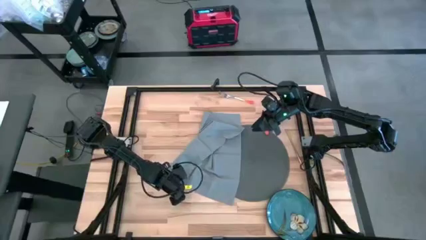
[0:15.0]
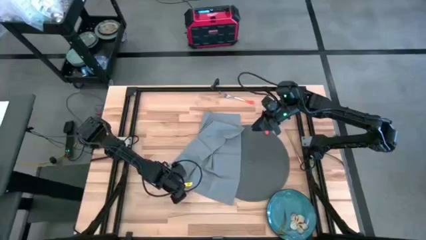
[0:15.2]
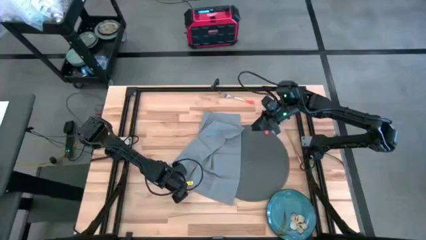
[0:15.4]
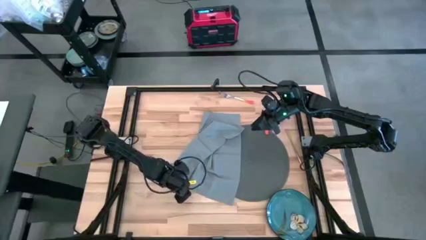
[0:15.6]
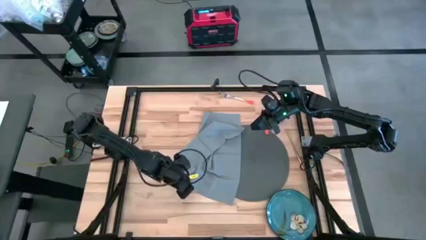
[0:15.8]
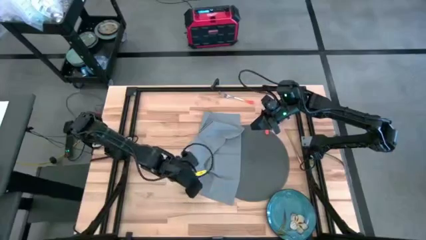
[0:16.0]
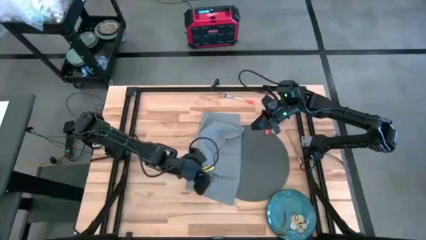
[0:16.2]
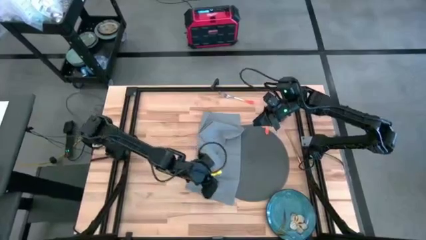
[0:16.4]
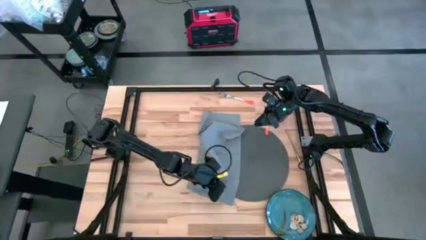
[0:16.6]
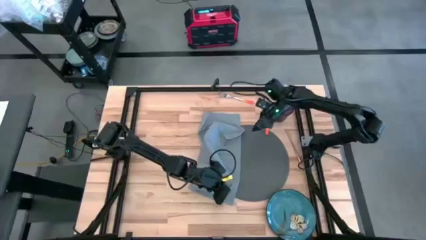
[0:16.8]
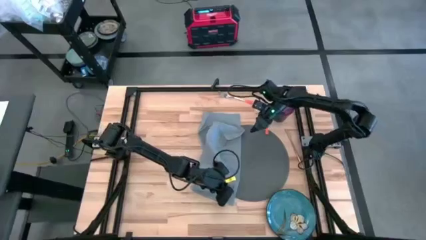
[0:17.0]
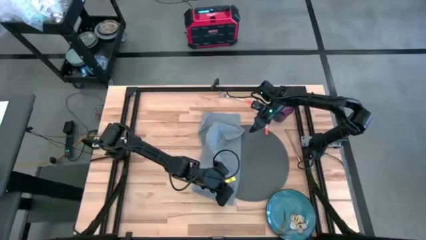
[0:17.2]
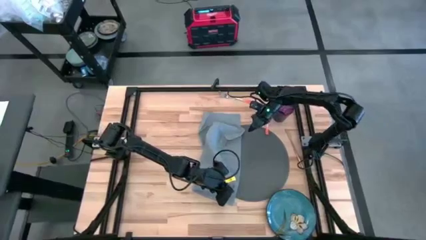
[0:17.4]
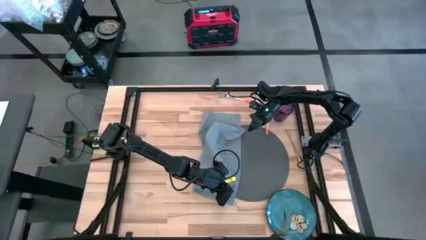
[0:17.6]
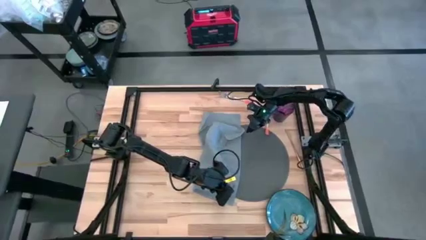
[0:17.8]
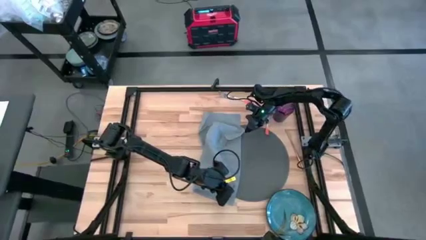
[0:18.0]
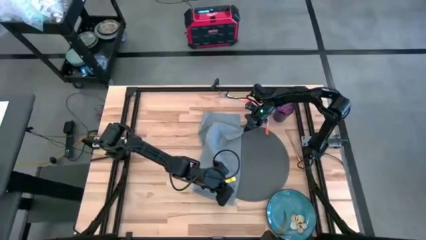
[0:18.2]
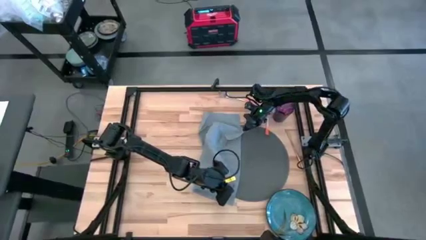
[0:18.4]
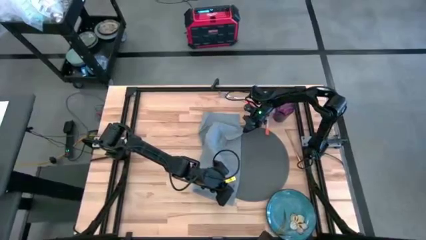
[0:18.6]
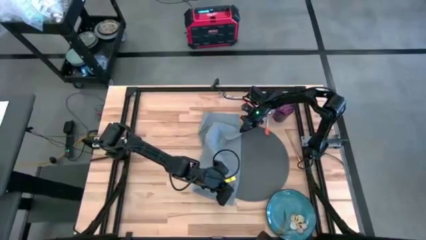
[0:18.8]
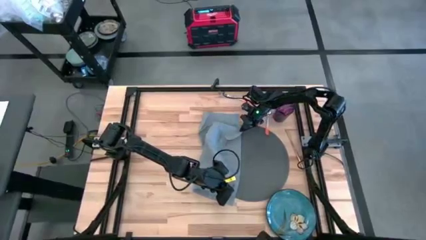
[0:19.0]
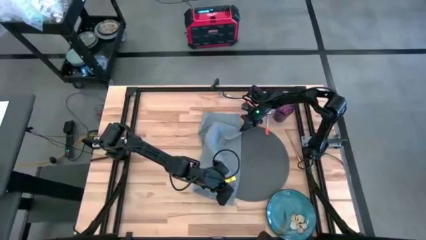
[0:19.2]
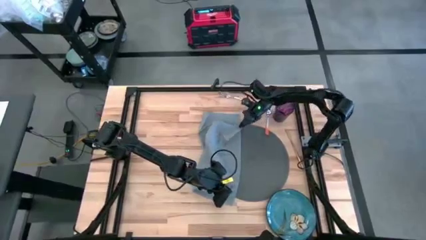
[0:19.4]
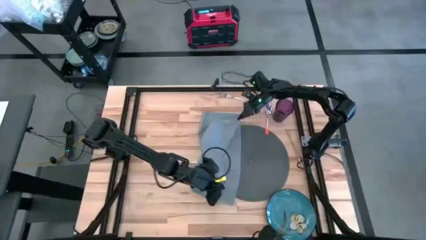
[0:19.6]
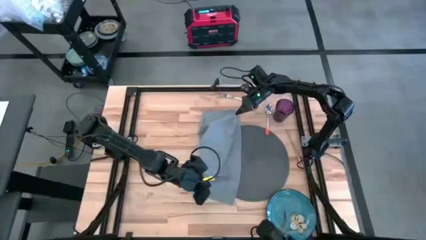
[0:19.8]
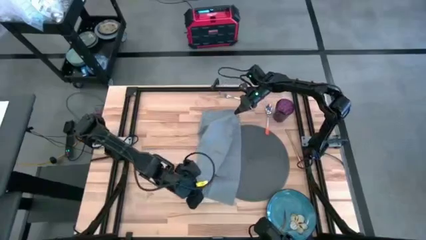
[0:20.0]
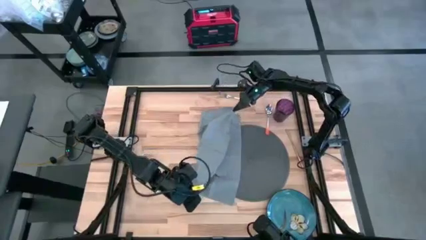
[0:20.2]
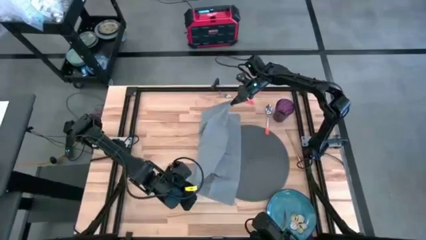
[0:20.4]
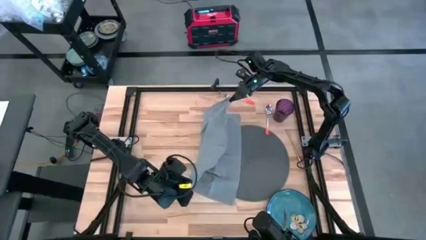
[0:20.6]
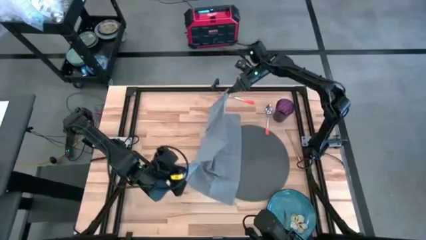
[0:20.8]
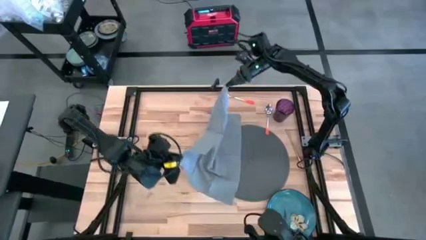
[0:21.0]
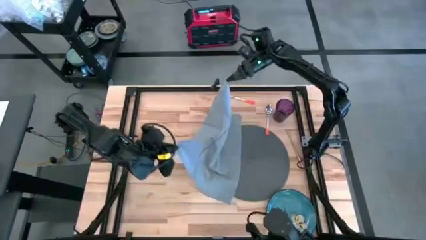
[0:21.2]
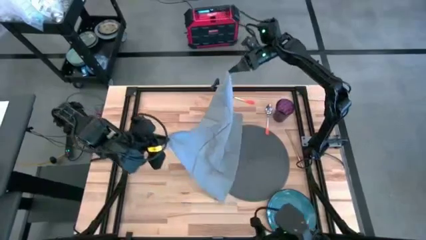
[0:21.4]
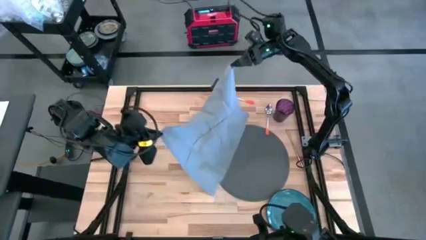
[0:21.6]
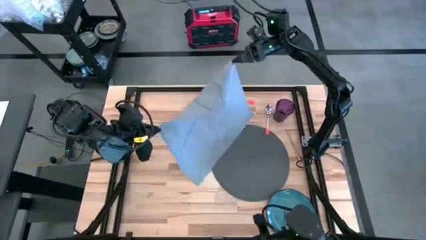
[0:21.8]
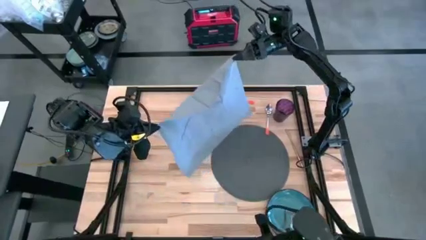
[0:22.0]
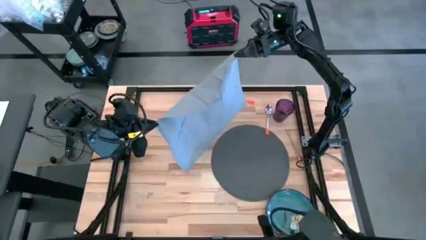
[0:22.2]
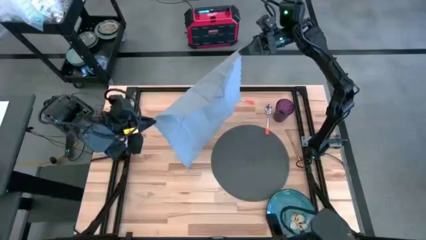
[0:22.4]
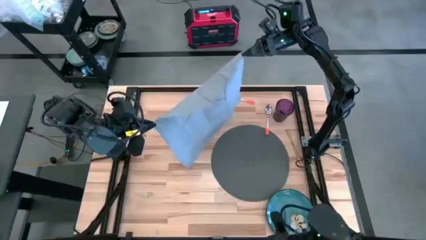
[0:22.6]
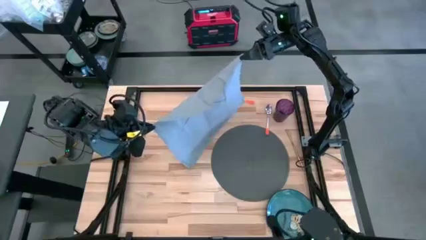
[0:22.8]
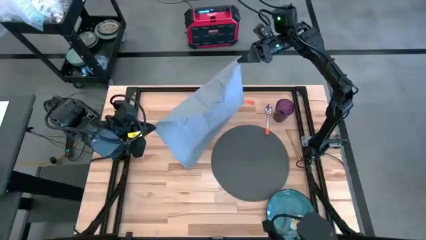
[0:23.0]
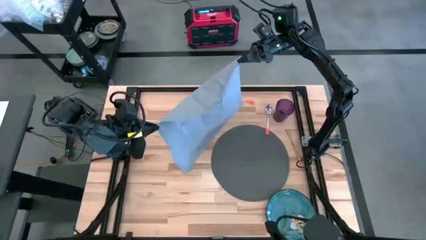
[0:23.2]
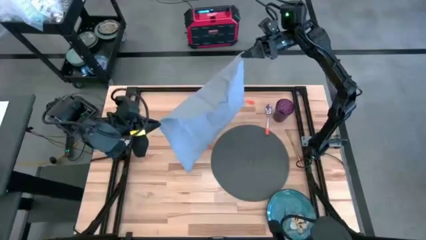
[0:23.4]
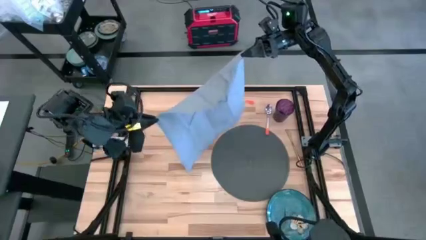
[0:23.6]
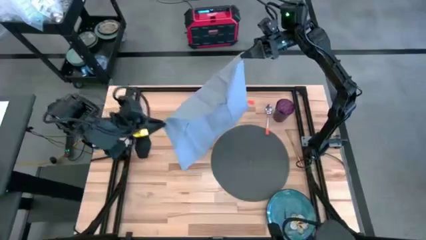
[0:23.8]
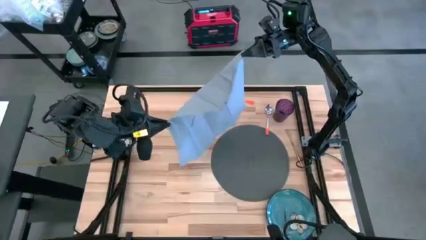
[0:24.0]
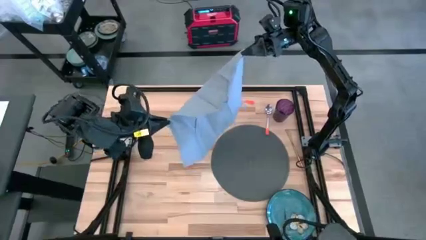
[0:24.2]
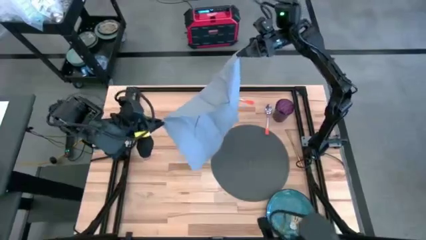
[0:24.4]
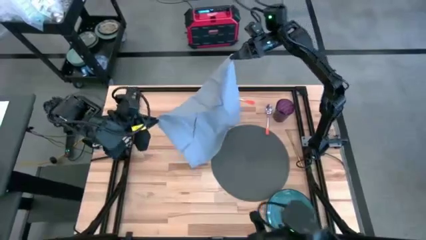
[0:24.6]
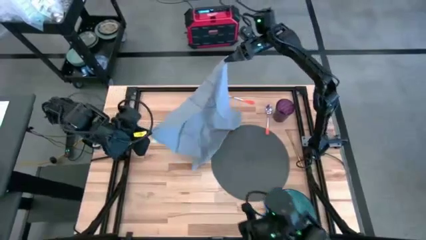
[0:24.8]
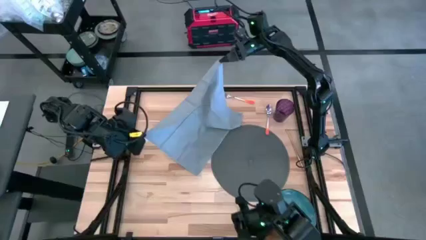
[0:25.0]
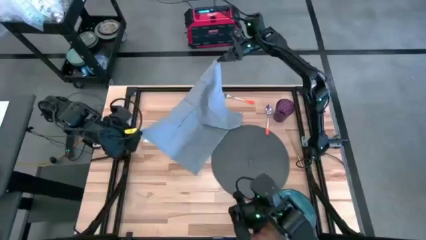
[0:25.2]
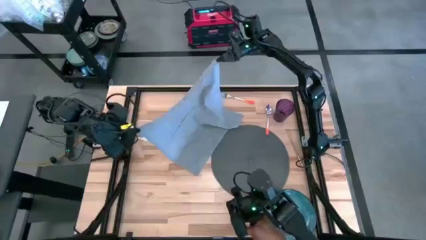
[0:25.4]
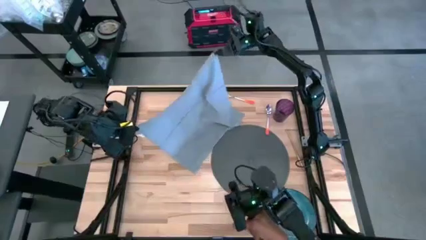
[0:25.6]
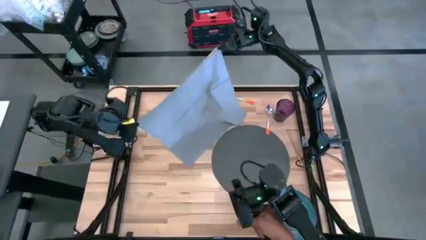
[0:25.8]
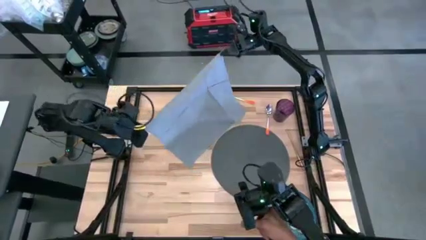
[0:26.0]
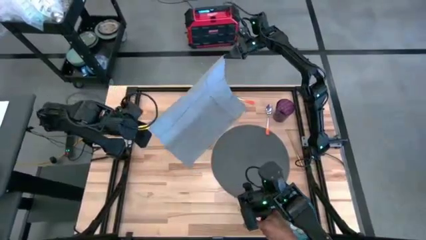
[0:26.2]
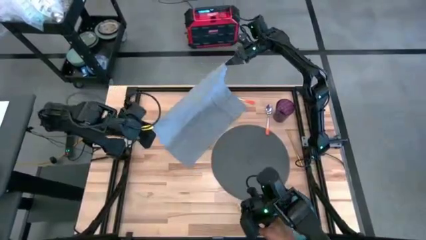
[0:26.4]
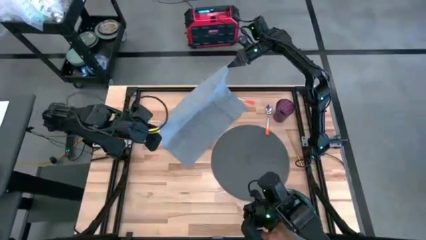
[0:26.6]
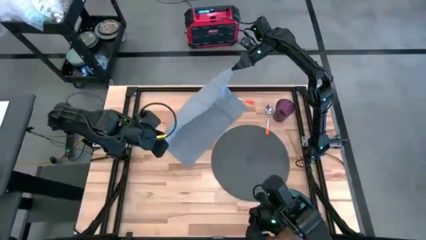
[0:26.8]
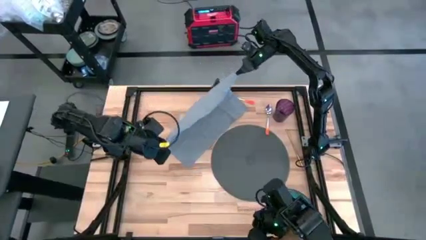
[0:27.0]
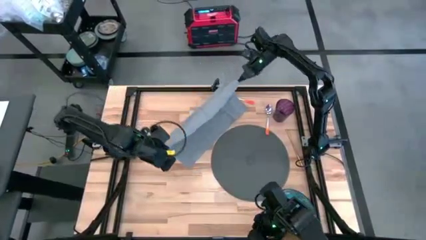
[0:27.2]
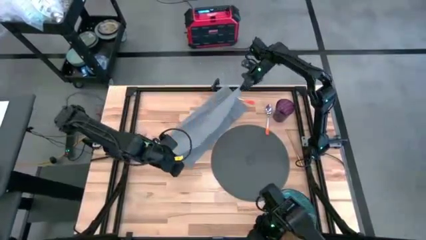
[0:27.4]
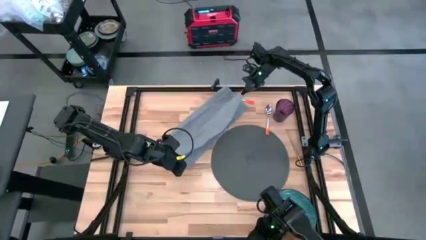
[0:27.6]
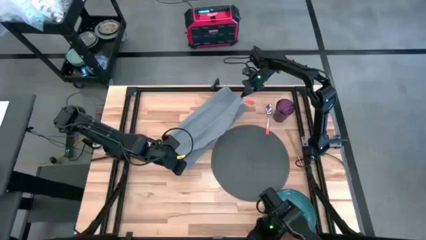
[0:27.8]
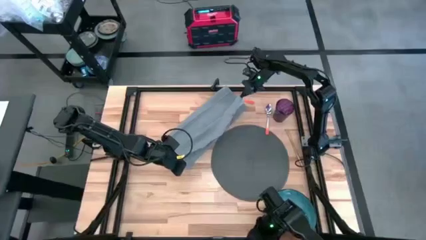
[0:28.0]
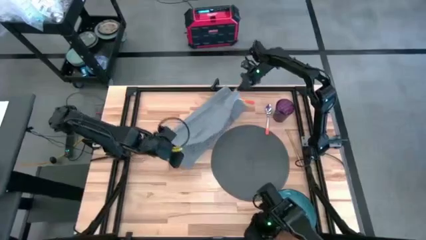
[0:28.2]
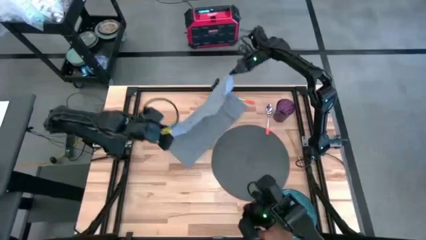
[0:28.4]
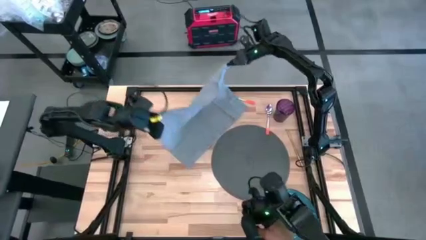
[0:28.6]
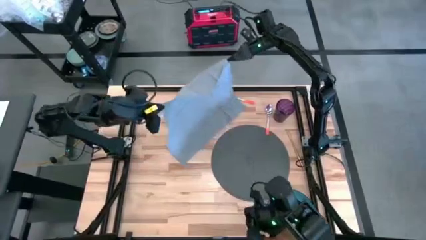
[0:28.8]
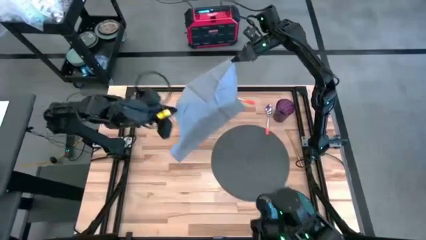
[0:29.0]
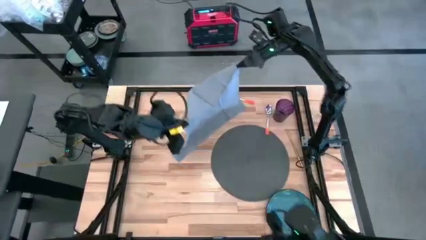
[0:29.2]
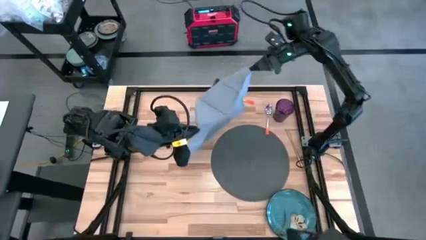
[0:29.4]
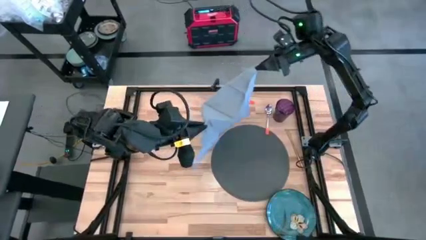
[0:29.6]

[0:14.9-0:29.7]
Task: Set table place
Fold the light gray table napkin on the table
